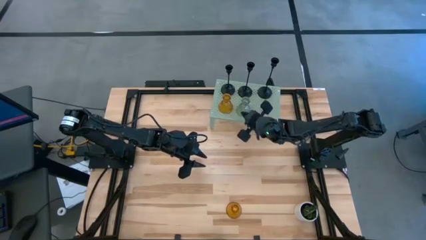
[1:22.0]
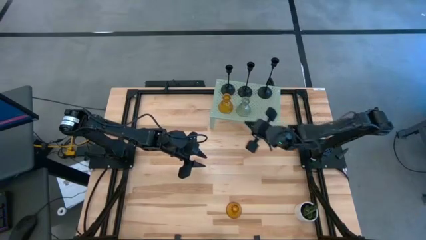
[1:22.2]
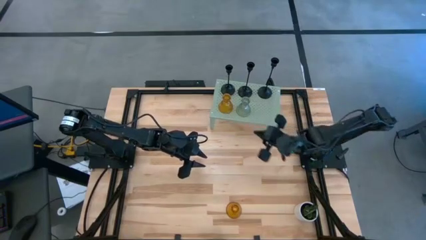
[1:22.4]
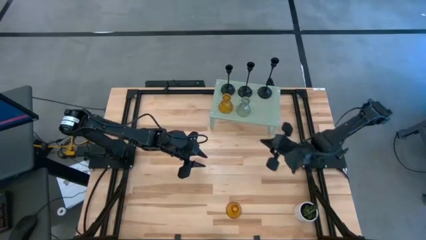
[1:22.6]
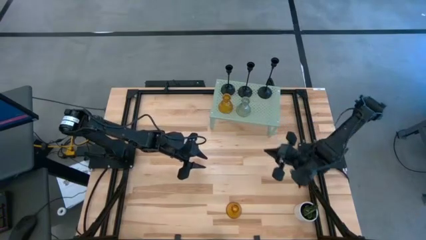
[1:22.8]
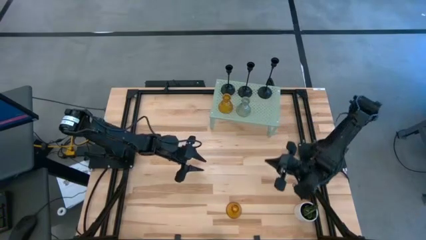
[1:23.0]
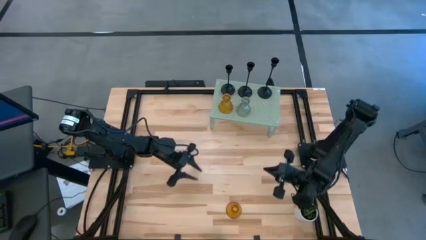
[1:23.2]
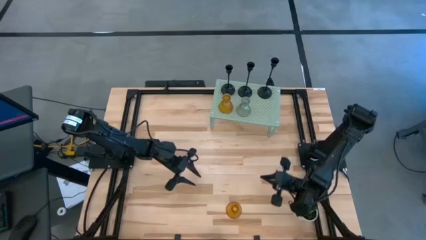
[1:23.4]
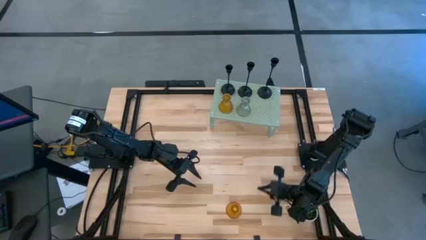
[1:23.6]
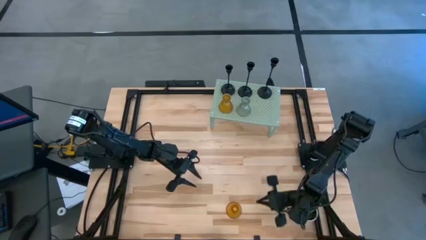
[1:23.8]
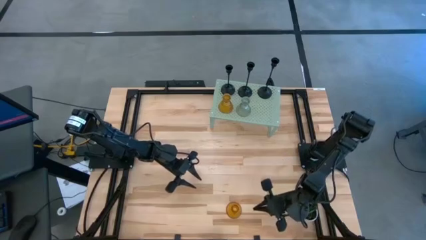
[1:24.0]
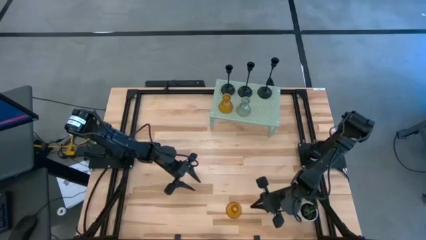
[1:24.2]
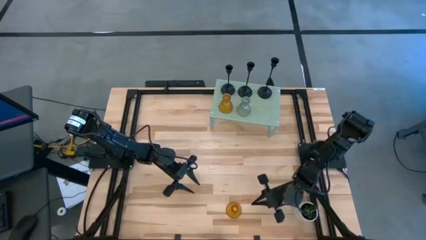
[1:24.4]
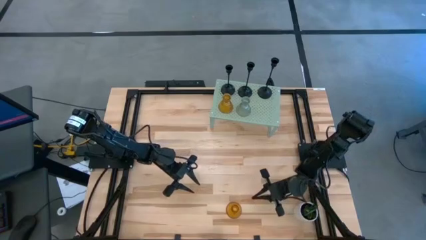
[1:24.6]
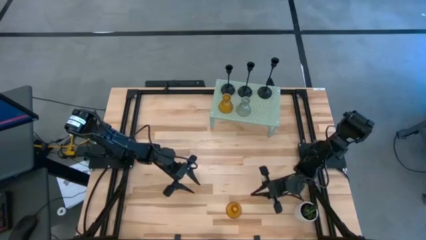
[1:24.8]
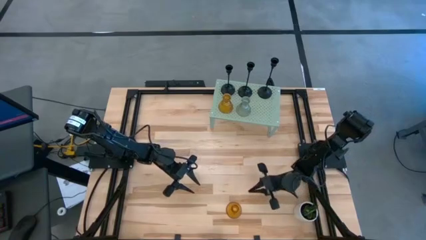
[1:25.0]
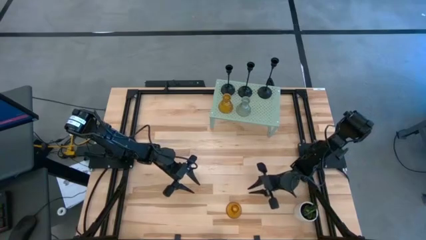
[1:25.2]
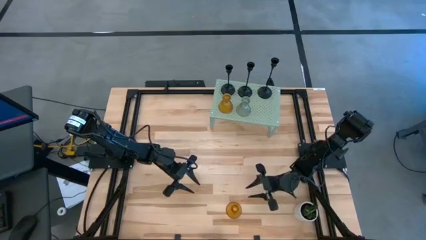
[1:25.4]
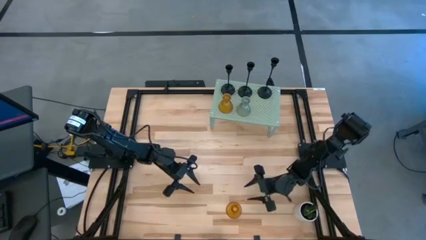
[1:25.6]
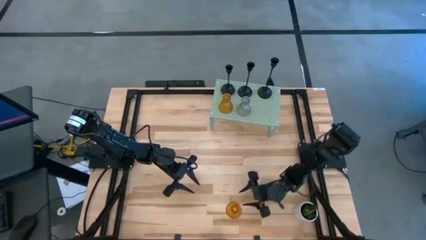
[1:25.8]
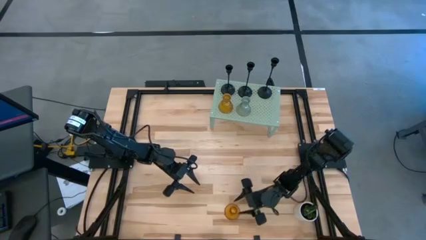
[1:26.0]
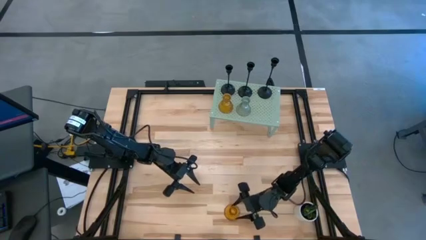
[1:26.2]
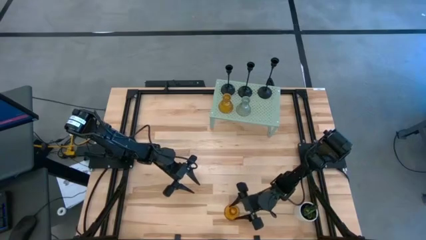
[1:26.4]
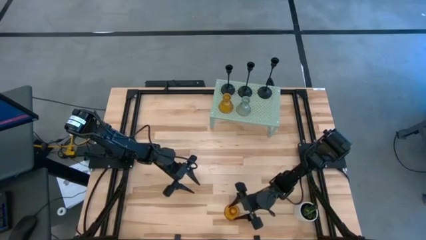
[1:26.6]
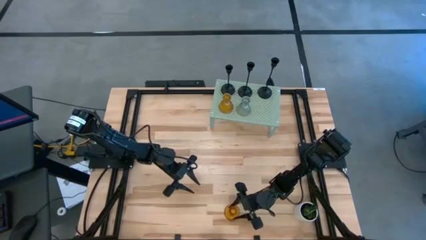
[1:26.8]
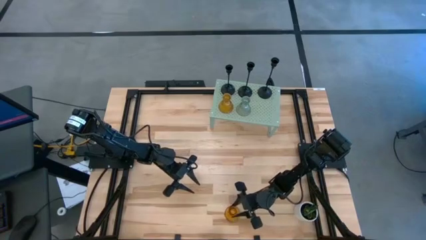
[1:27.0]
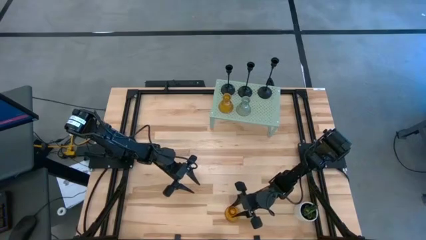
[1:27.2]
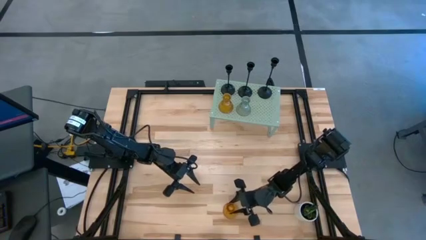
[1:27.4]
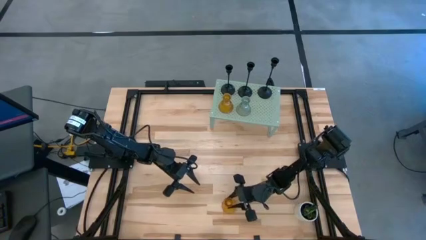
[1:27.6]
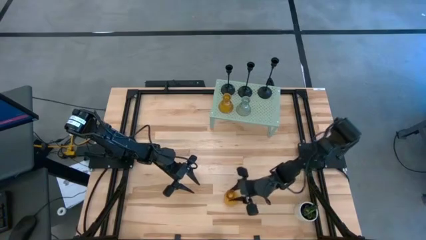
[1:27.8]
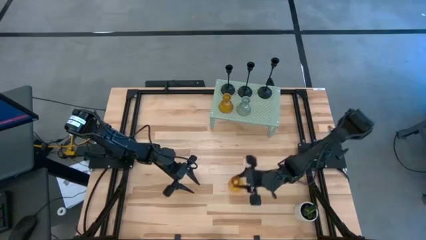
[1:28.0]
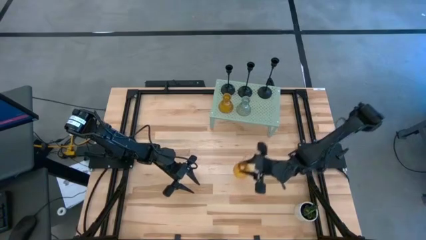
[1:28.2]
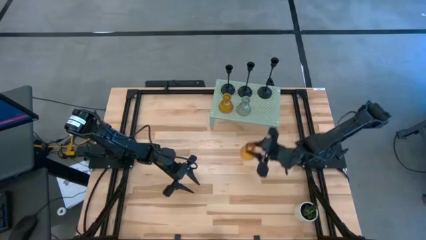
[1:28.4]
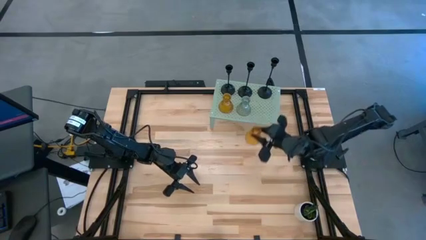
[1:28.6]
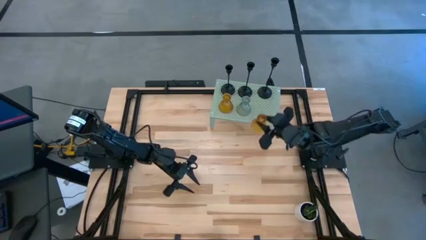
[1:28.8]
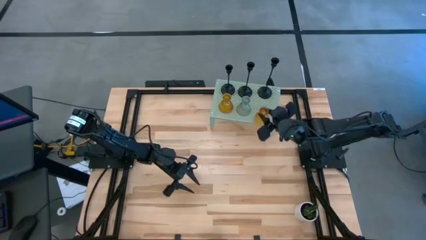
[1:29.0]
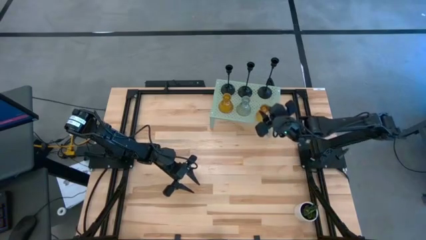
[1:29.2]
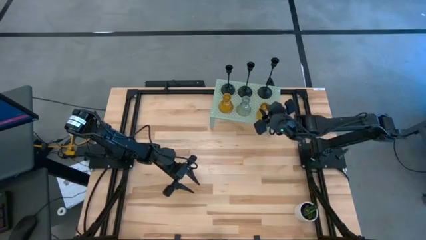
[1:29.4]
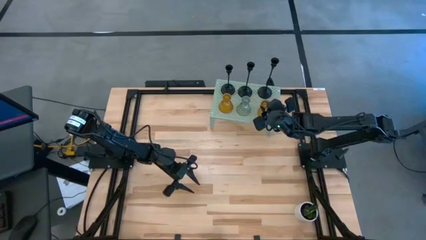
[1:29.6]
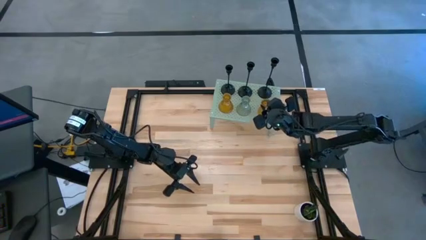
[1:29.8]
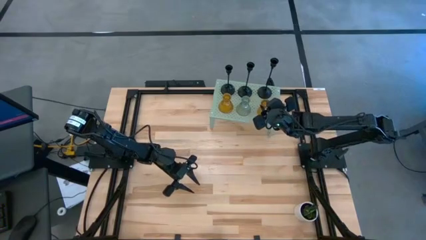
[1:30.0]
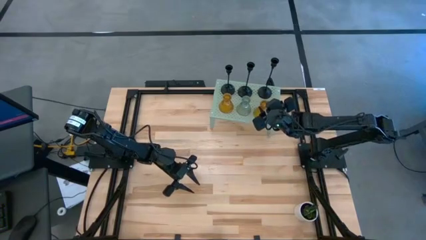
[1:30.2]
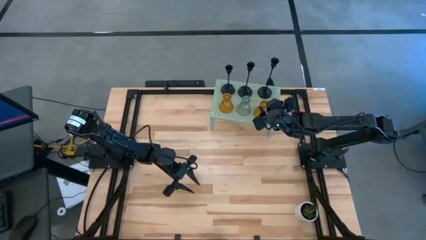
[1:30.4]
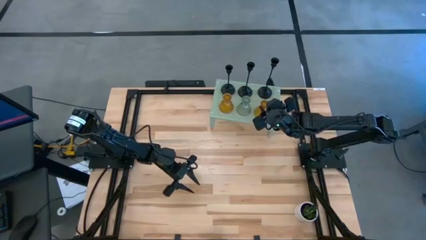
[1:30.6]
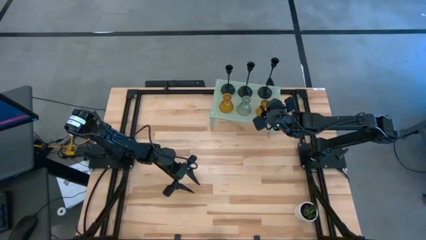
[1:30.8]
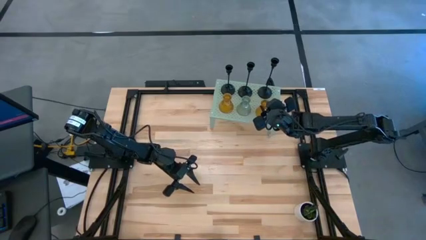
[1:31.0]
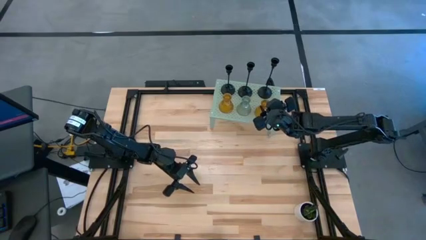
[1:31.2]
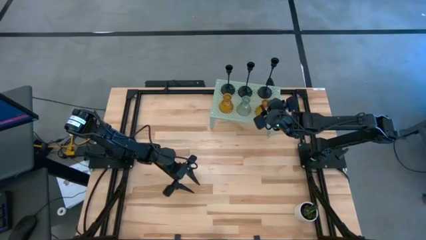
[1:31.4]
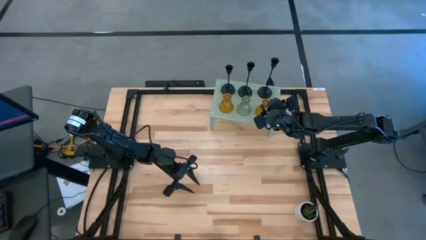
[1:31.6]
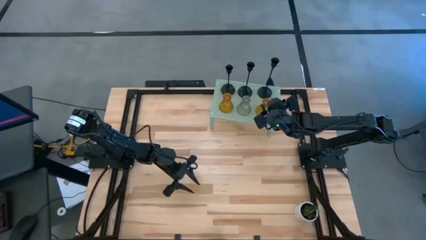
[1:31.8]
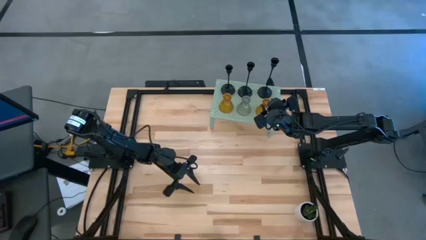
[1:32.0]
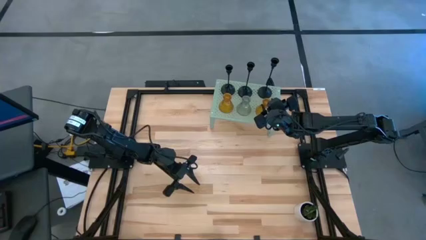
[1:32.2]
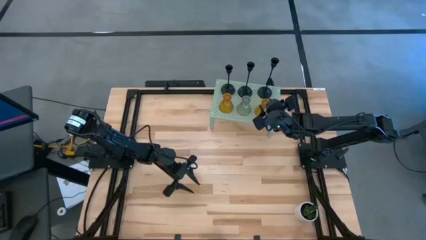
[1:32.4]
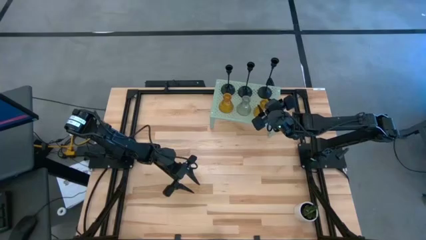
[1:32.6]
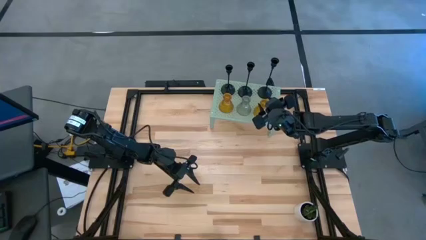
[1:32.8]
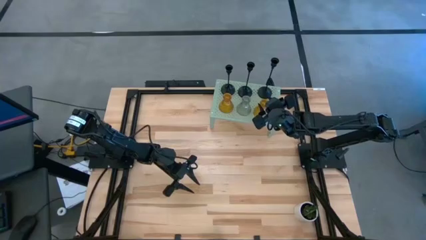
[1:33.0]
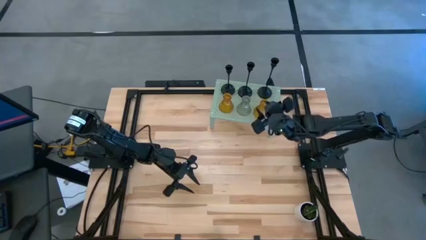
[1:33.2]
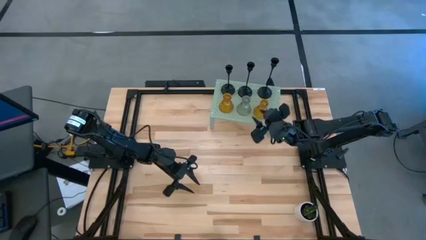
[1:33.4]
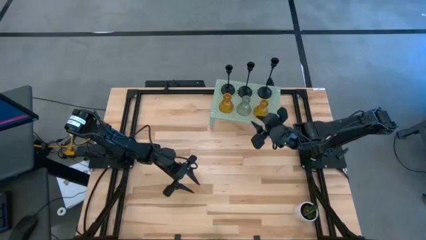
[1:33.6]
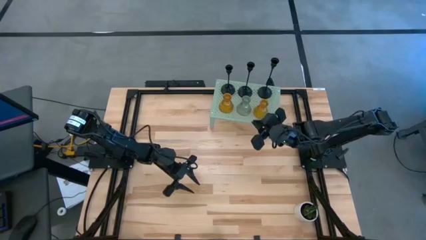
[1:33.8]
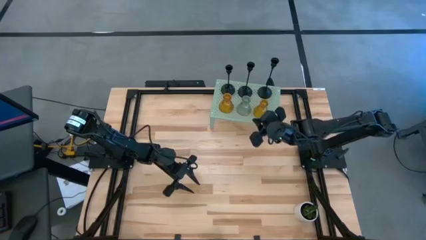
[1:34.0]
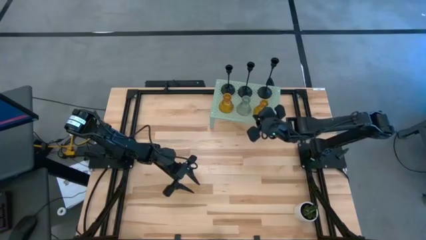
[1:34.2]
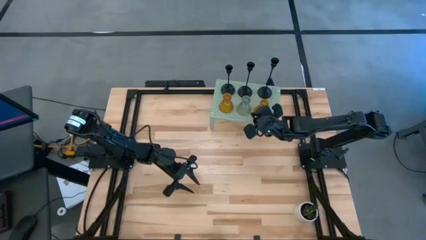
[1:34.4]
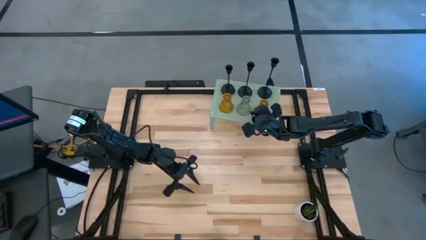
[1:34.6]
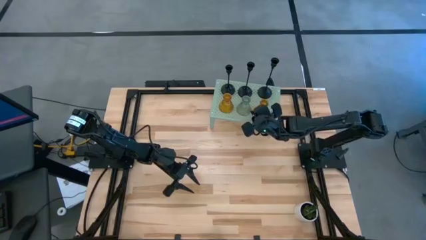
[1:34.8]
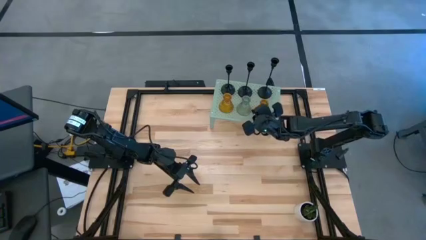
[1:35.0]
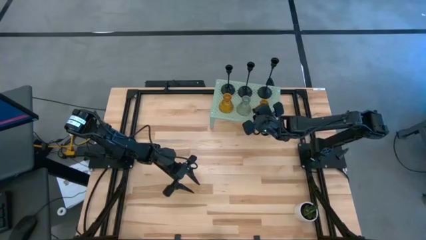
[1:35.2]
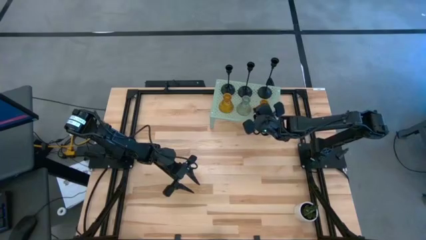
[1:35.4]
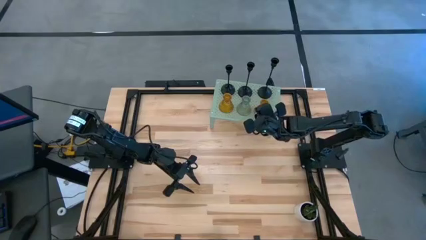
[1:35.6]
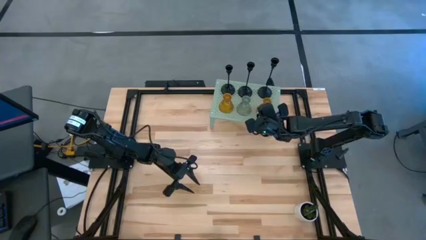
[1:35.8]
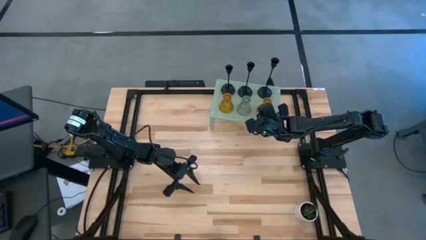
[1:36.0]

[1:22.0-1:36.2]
Task: Pick & Place candle stick holders
Put the orange glass candle holder on the shelf
